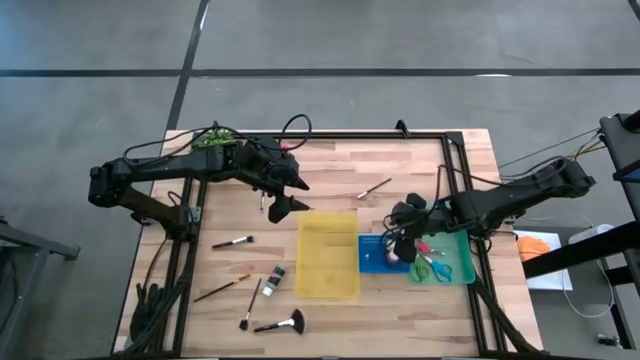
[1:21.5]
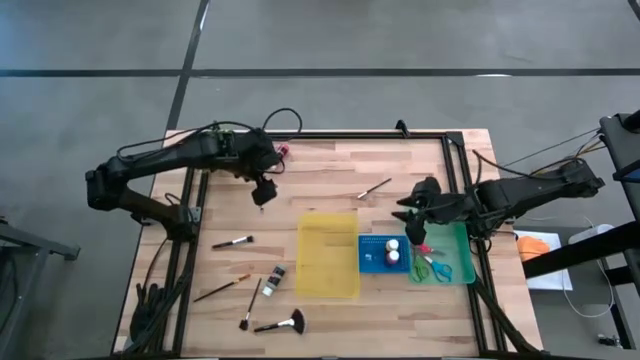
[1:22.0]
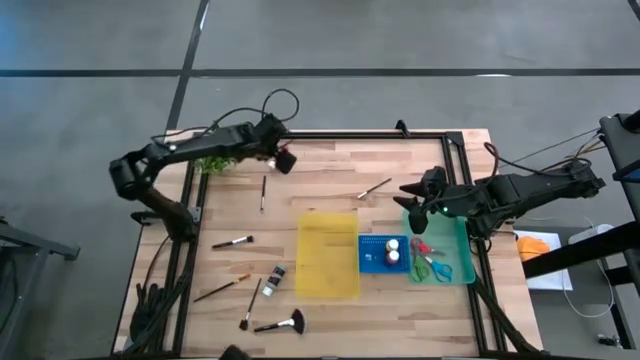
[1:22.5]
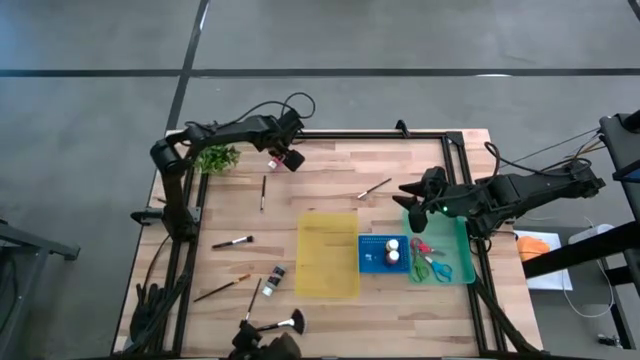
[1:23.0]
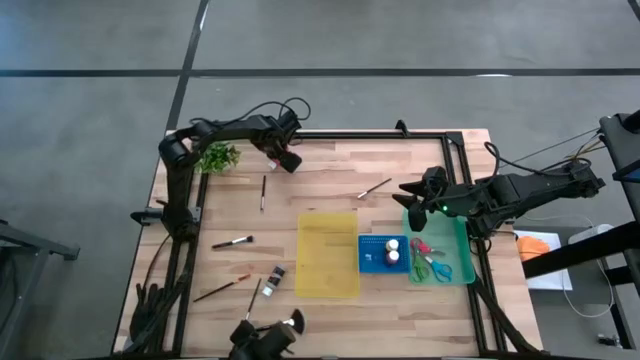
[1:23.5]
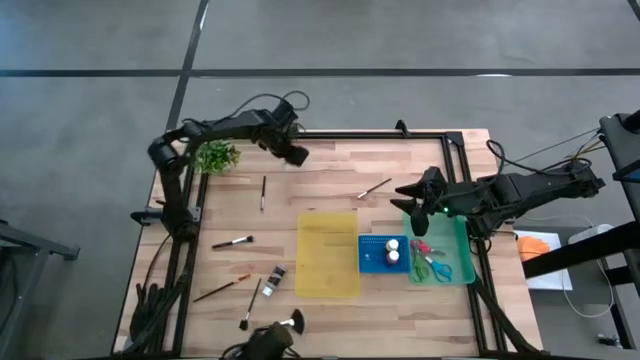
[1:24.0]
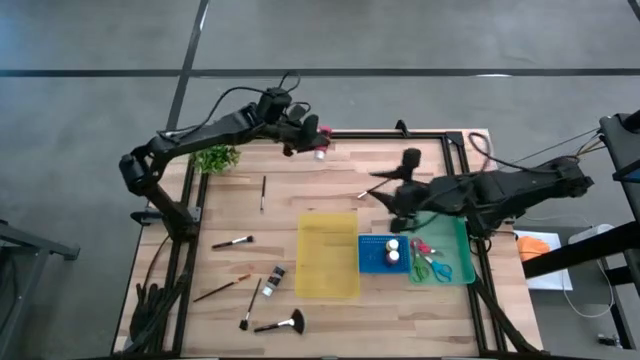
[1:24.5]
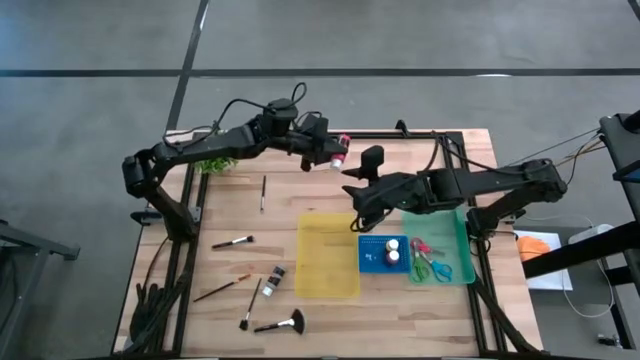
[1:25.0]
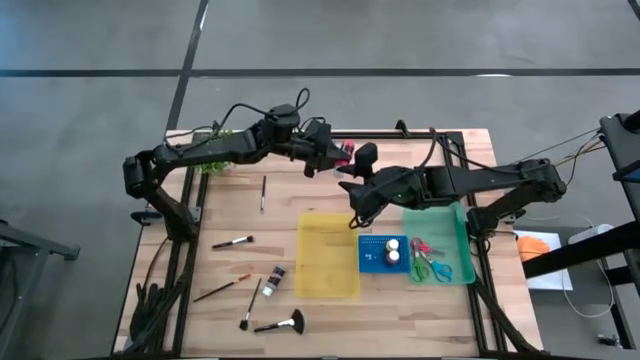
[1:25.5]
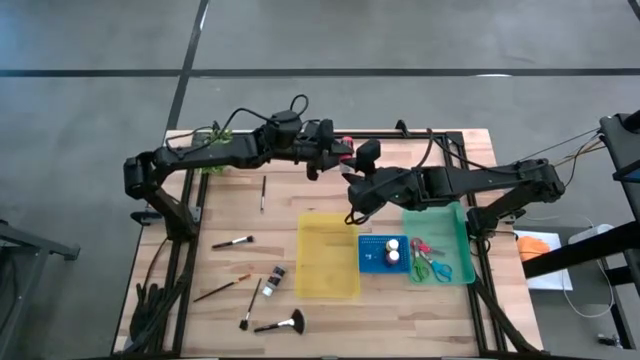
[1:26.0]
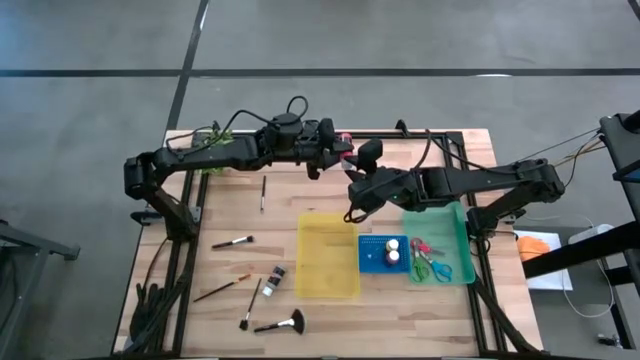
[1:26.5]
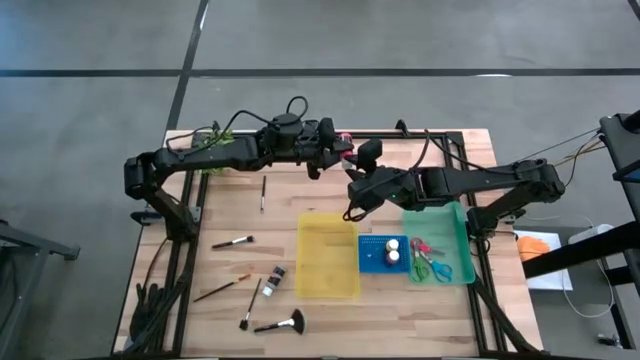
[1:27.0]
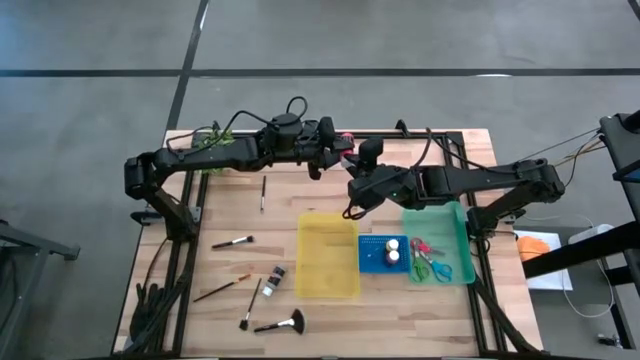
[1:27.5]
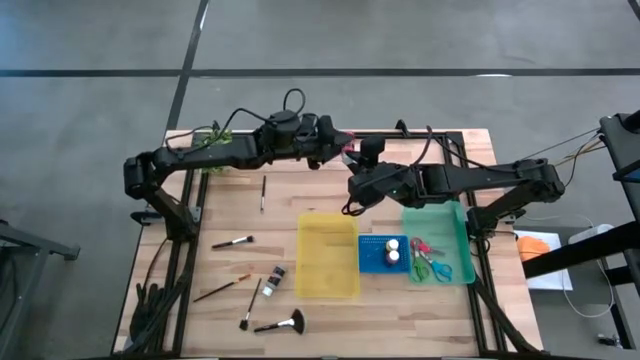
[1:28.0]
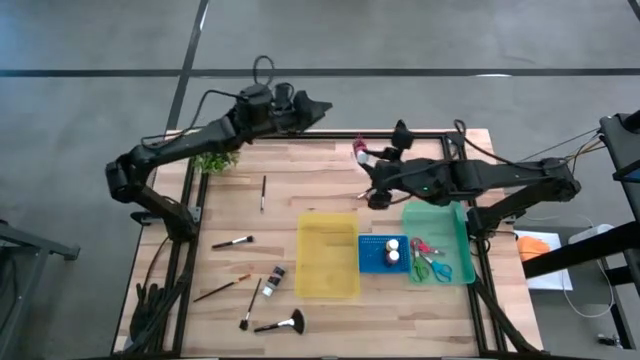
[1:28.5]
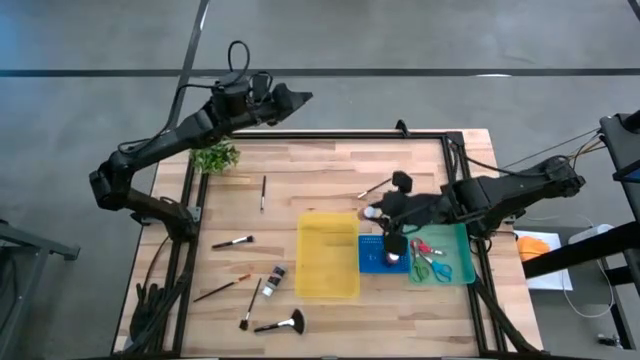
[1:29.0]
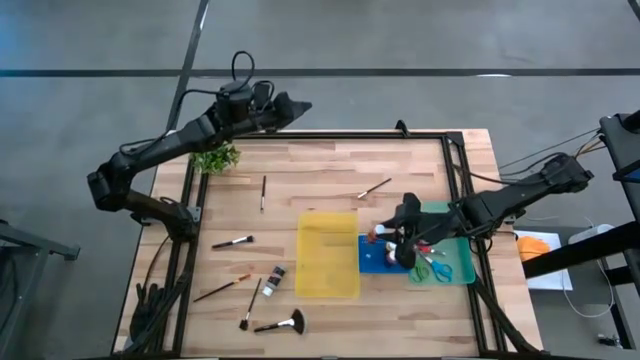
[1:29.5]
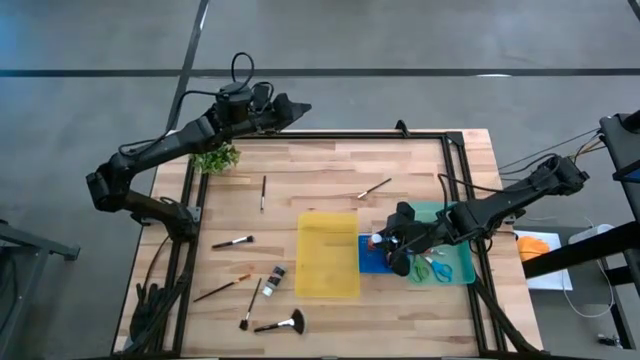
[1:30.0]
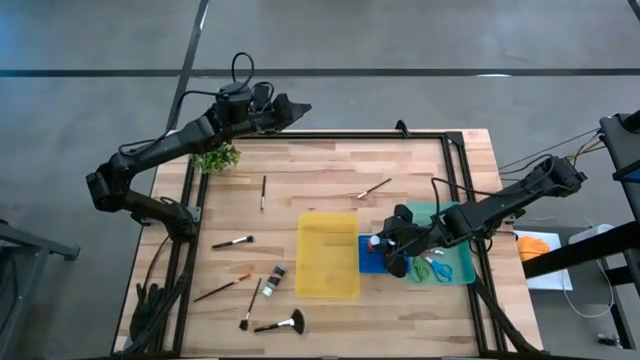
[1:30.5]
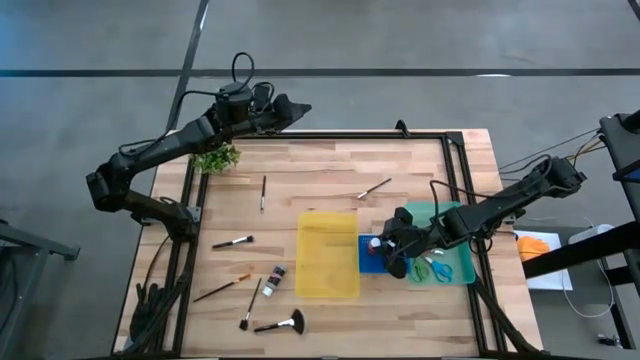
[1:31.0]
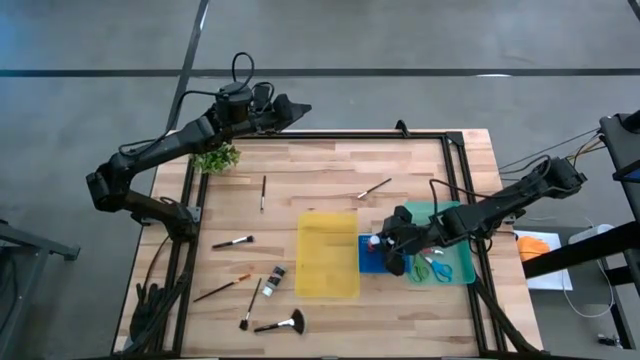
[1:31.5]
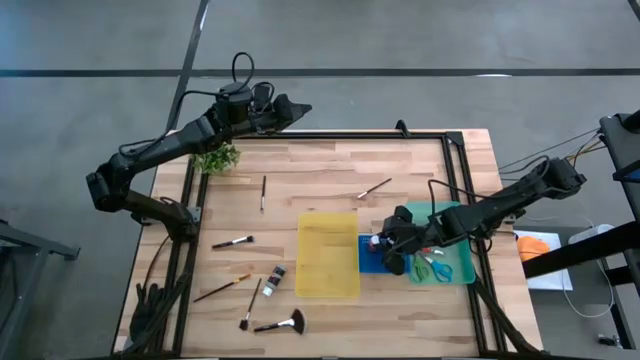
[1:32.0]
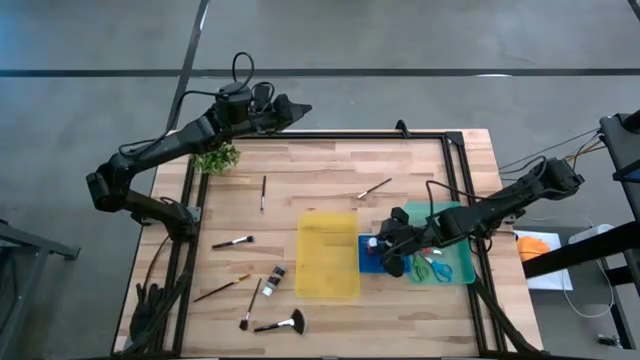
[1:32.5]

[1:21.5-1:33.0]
Task: Pick & Place Paint Supplies
Put the orange paint bottle into the blue bin

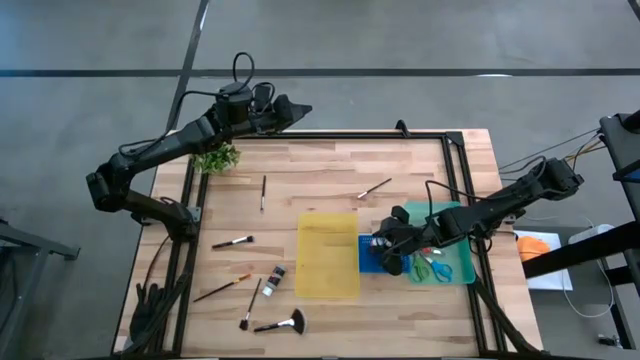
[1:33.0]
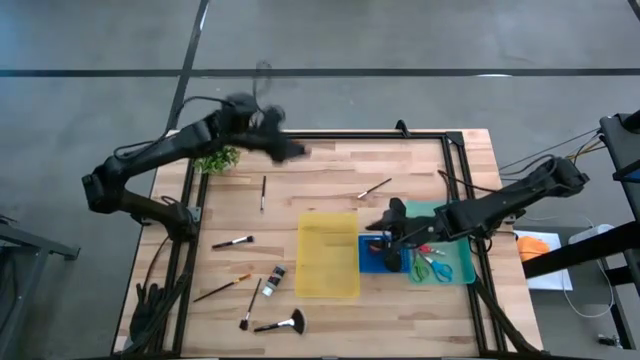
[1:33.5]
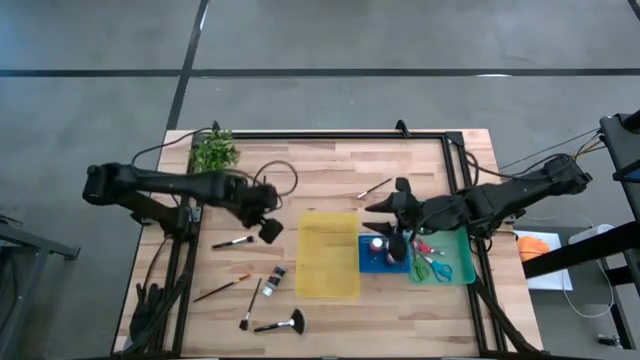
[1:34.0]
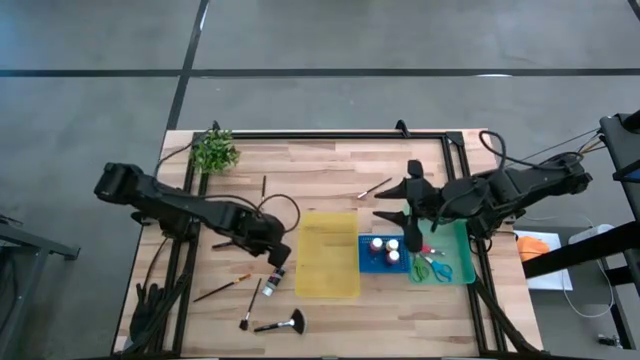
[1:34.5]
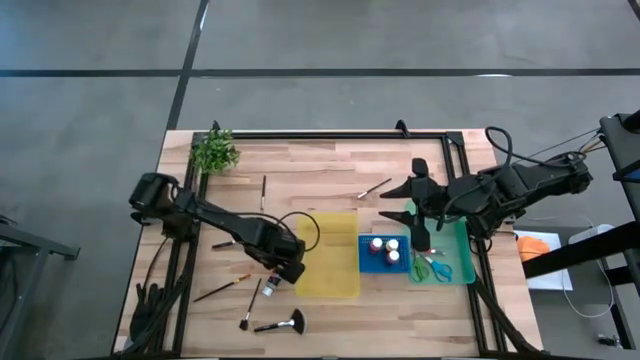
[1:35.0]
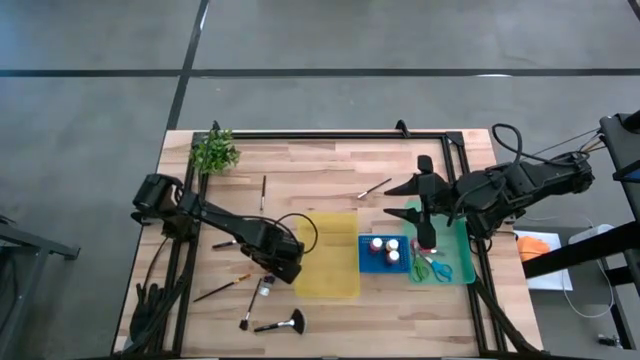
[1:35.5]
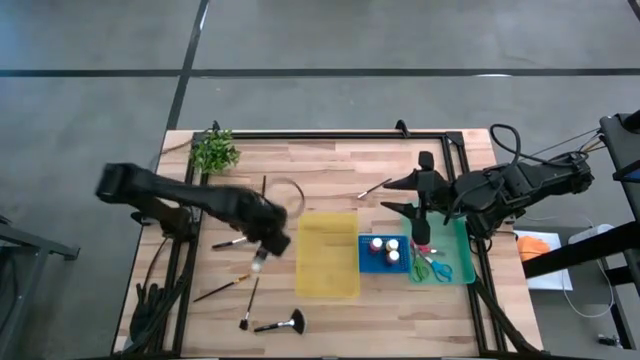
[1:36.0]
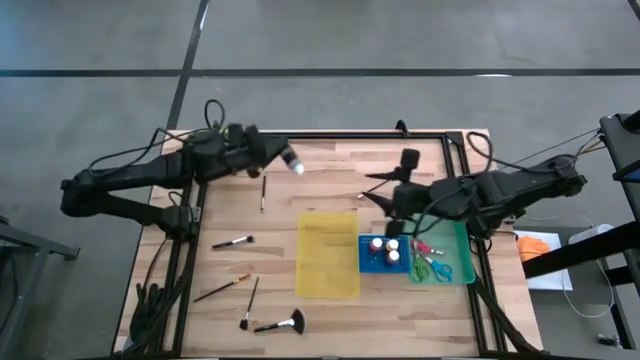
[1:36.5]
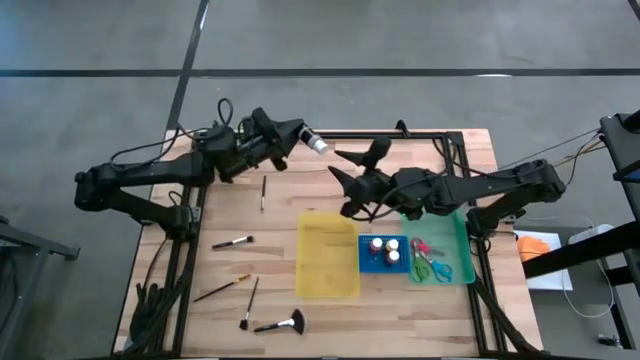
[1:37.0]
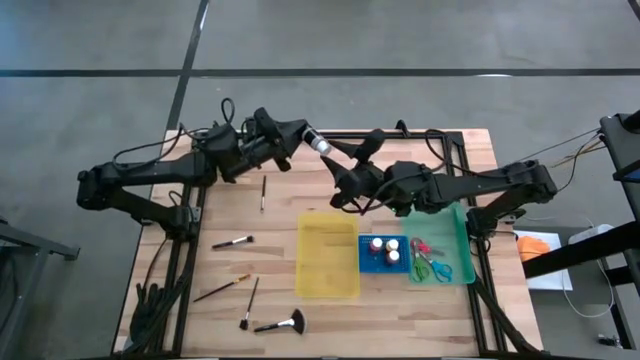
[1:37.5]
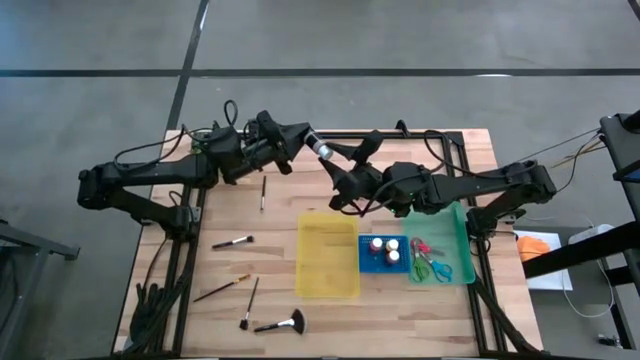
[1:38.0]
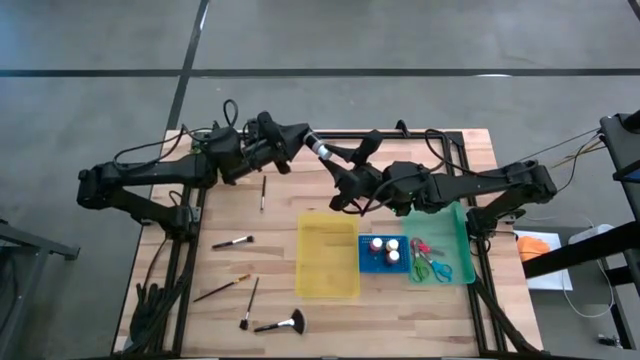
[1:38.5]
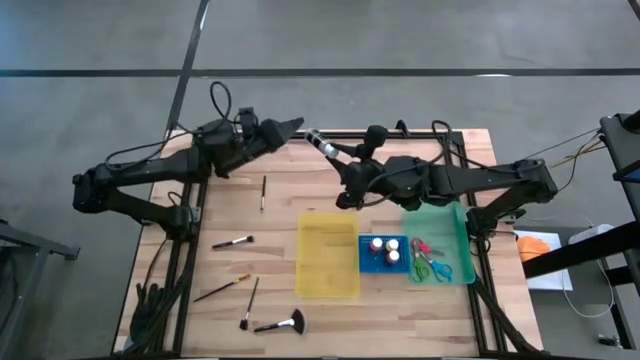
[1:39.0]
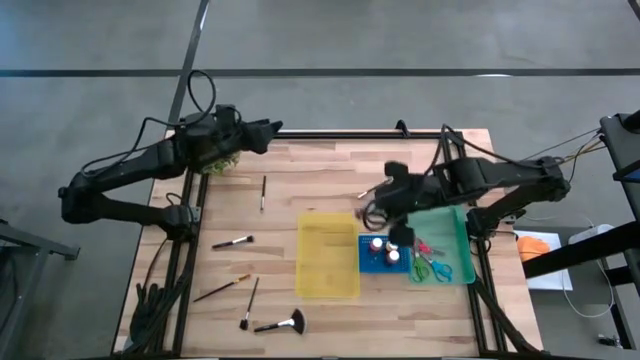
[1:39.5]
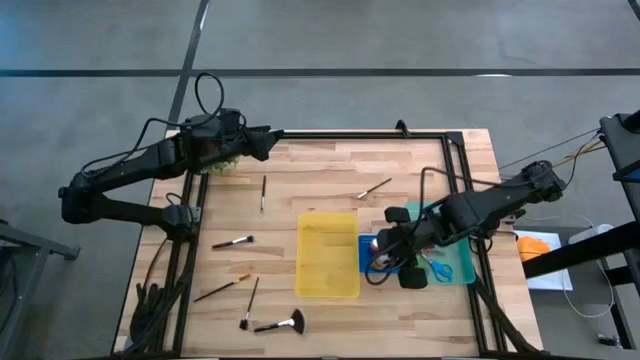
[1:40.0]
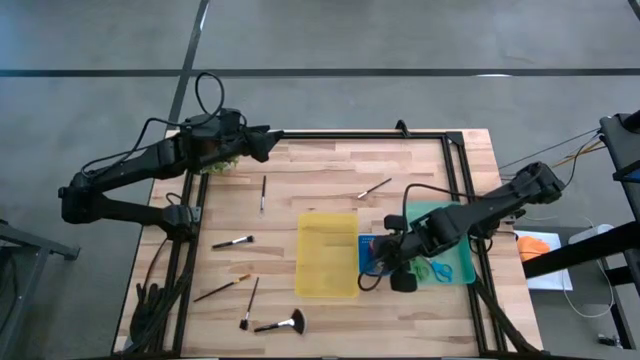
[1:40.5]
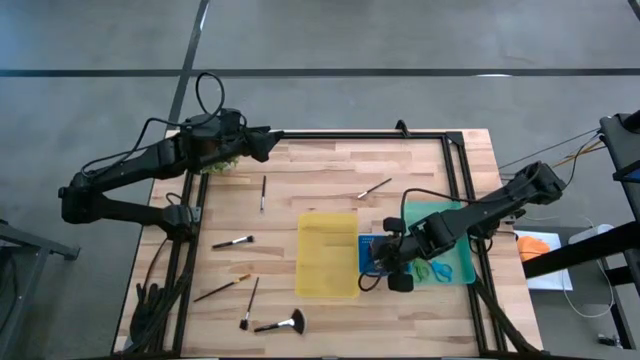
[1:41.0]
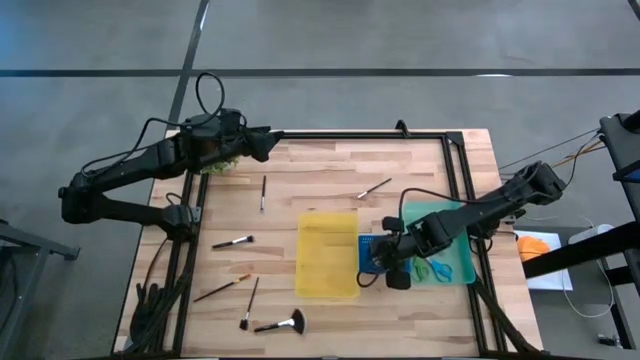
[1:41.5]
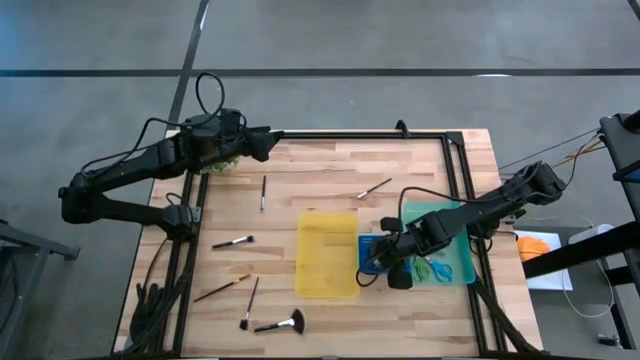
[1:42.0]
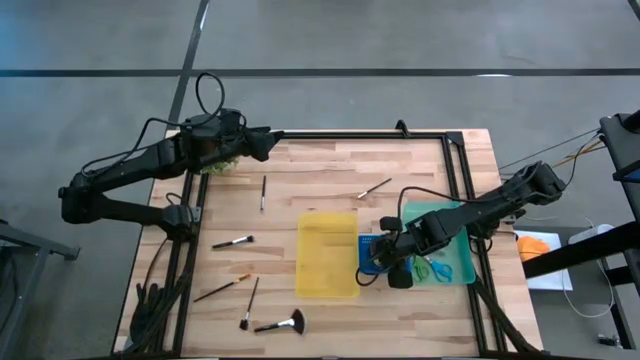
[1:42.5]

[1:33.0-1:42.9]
Put the gray paint bottle into the blue bin
